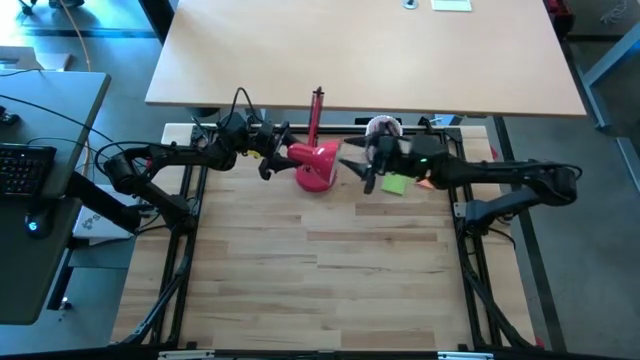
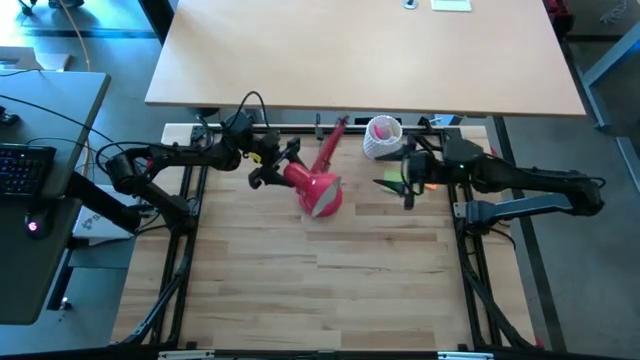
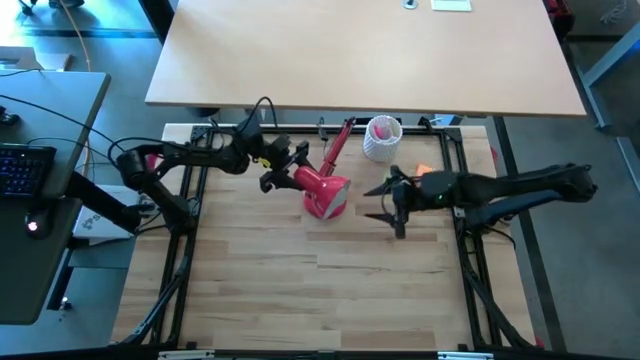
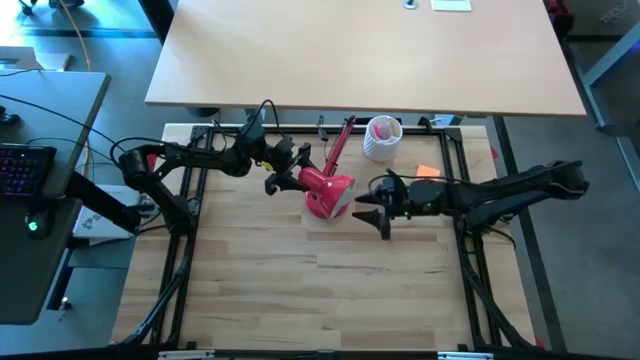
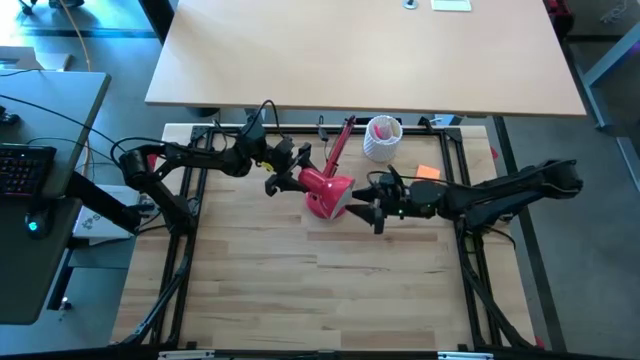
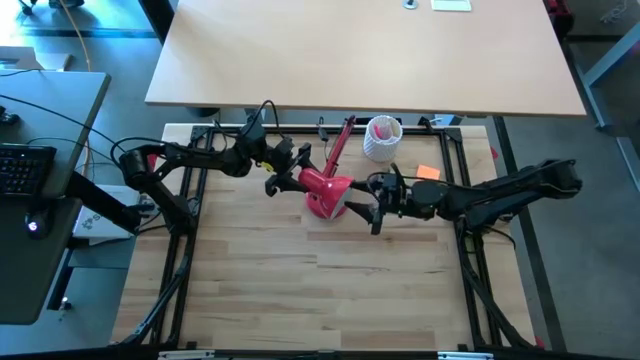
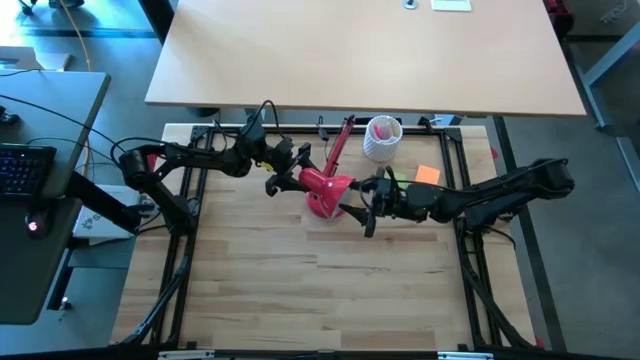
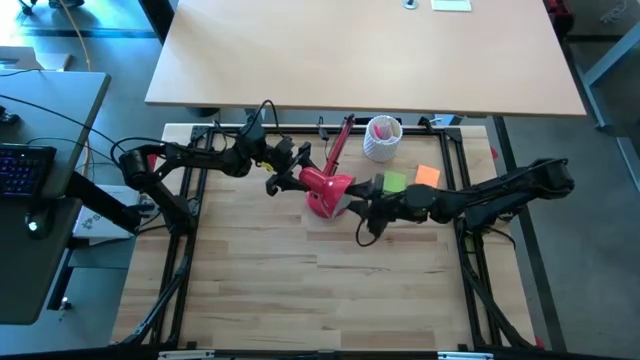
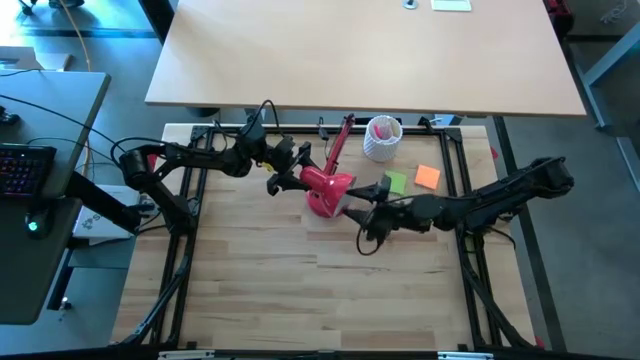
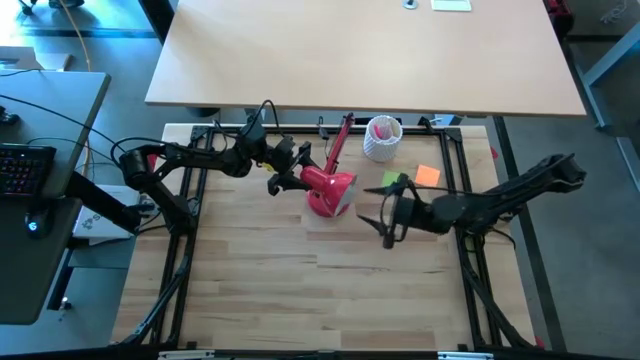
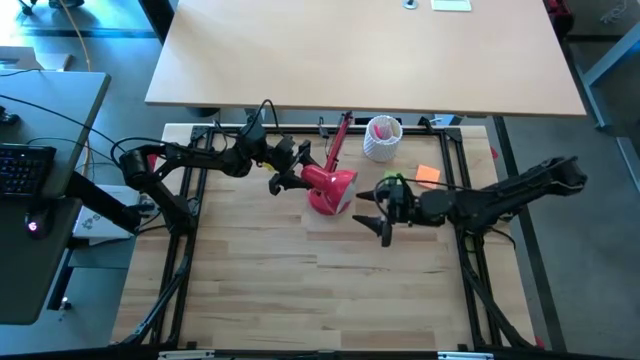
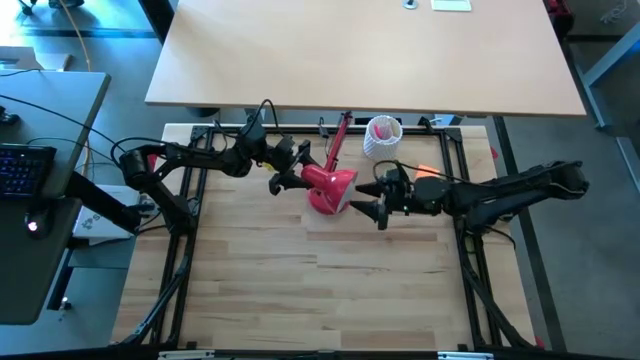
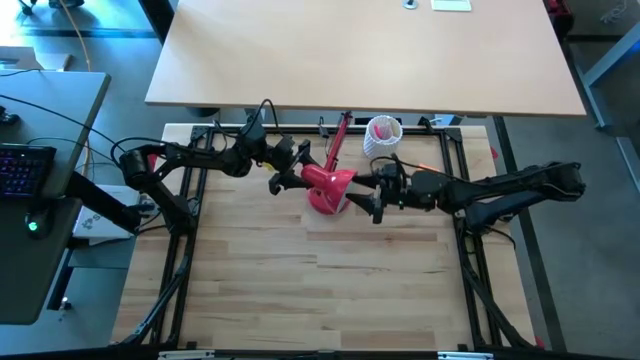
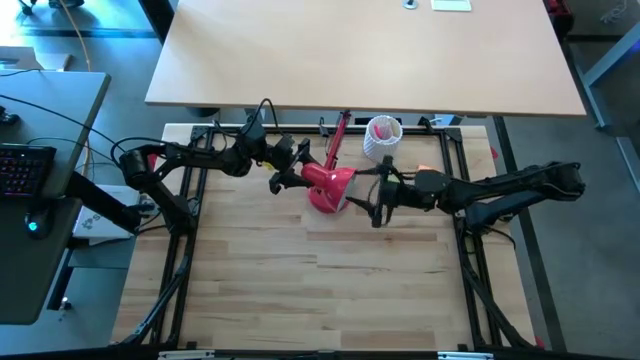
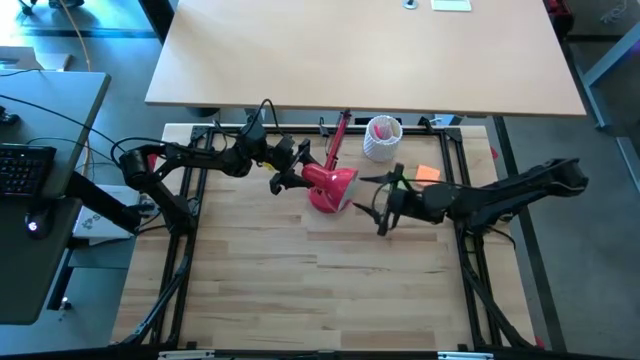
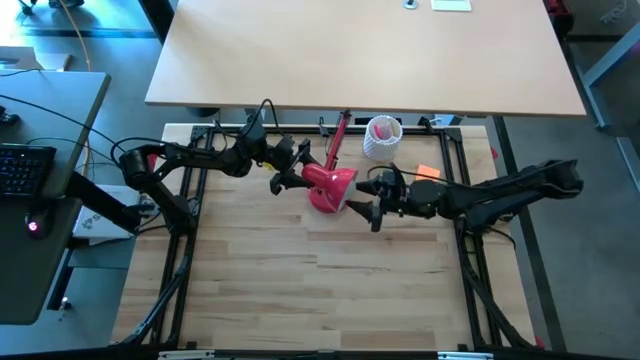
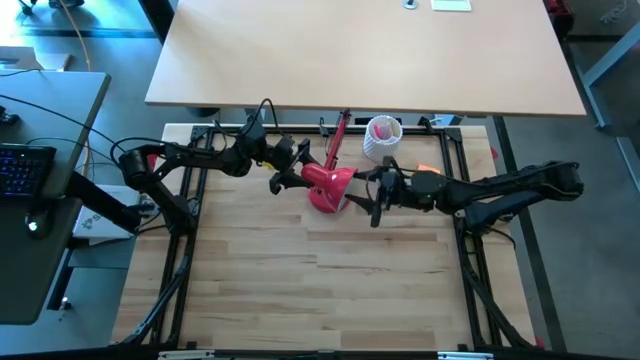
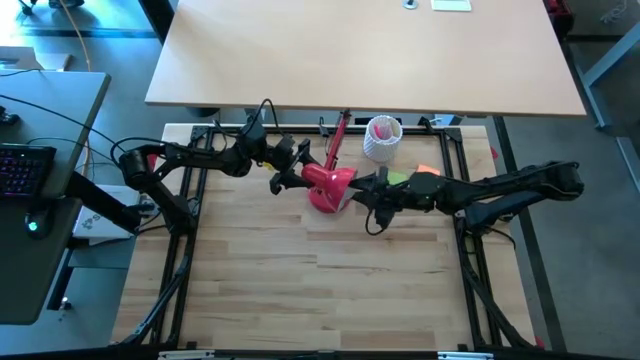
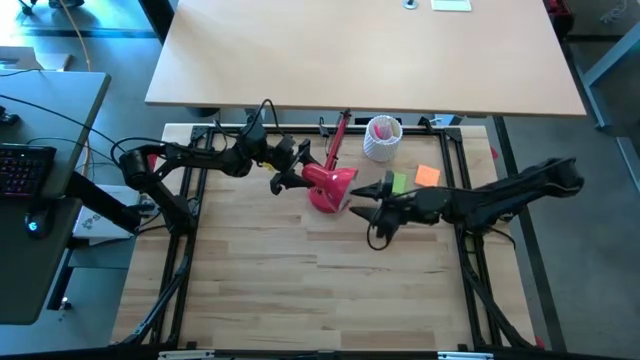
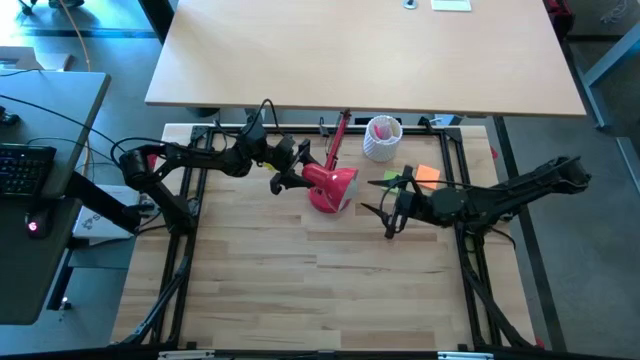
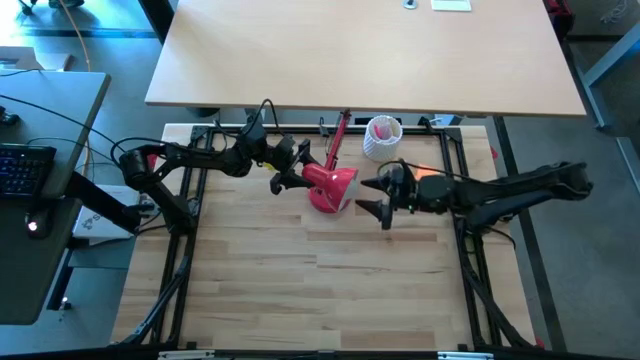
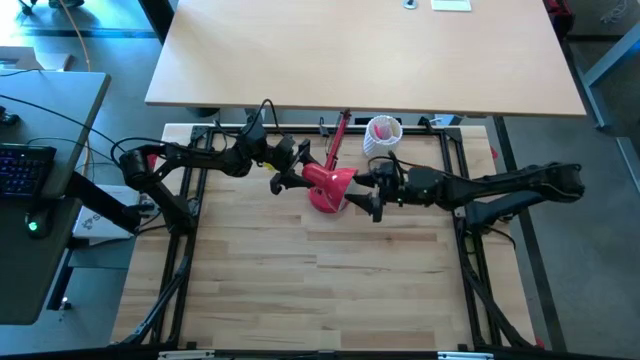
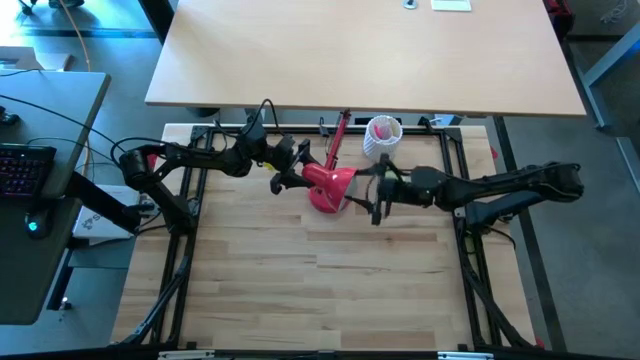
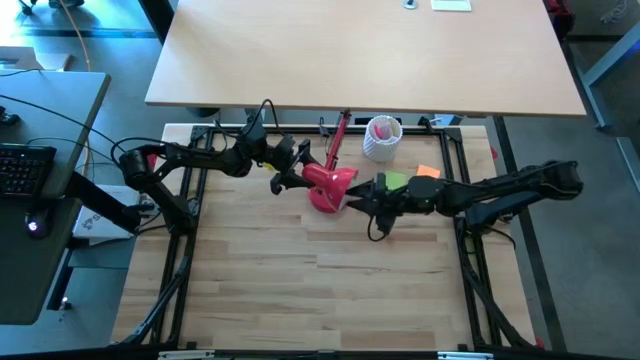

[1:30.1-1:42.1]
Task: Screw lightbulb
Remove the lightbulb from the red lamp

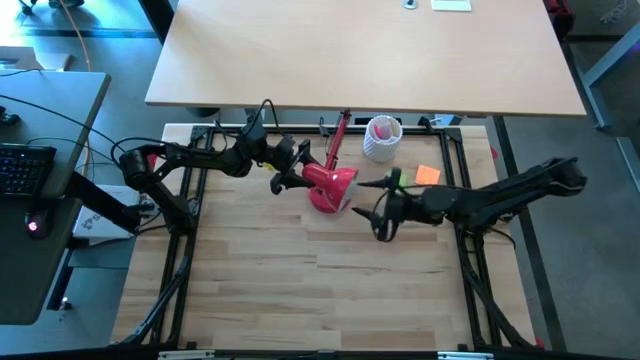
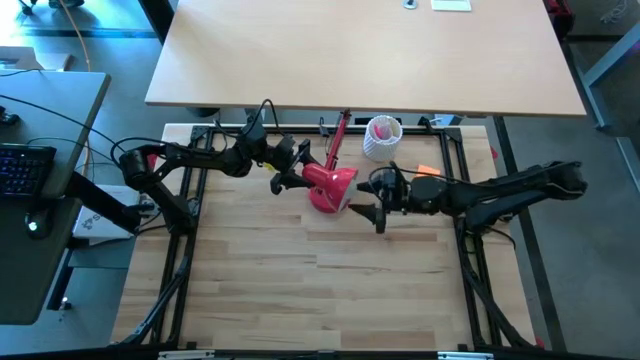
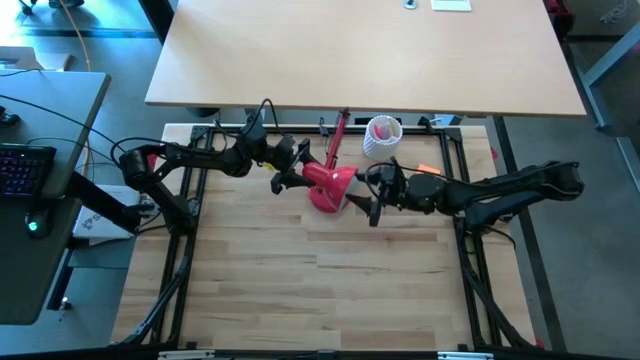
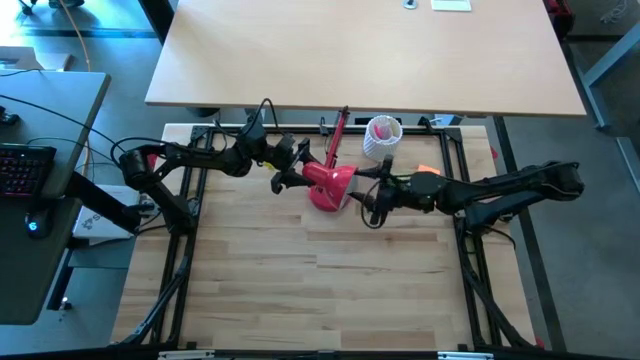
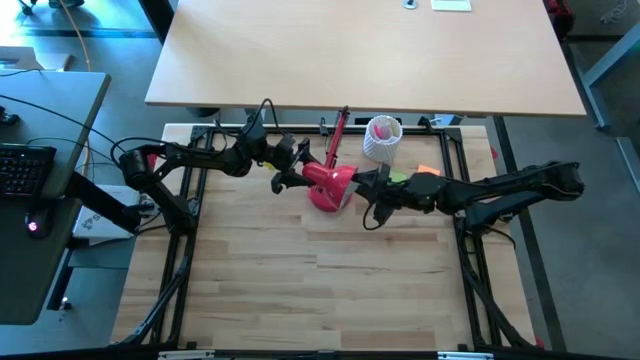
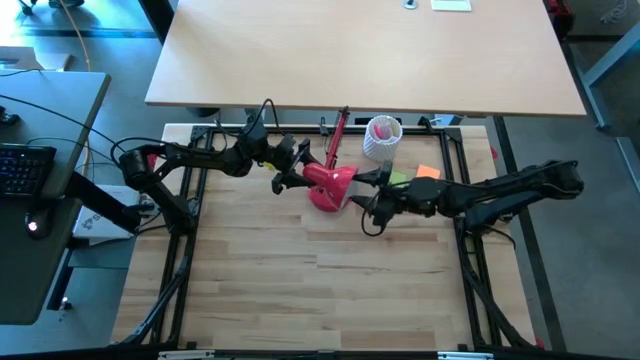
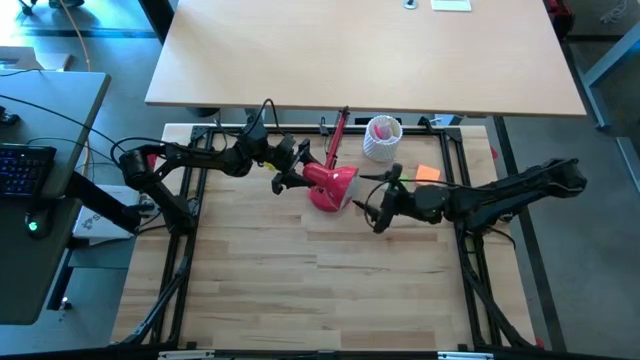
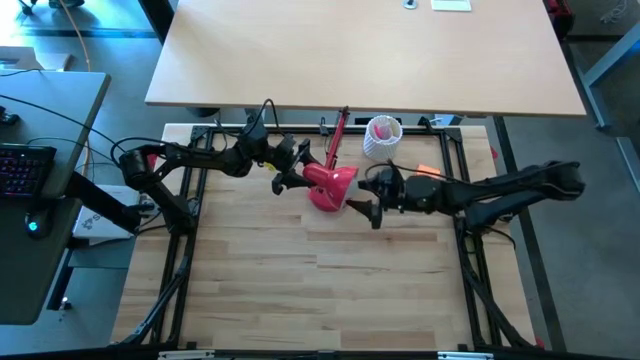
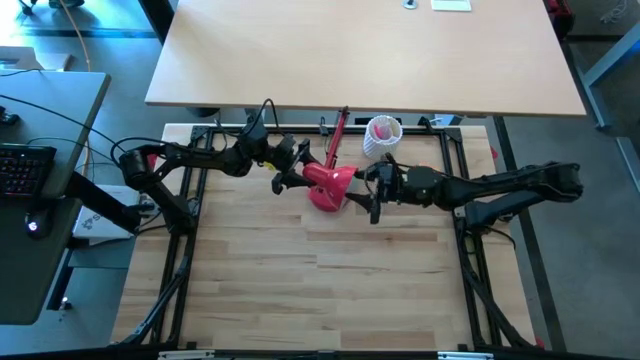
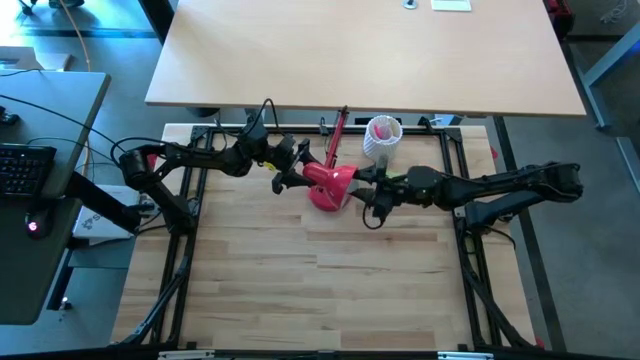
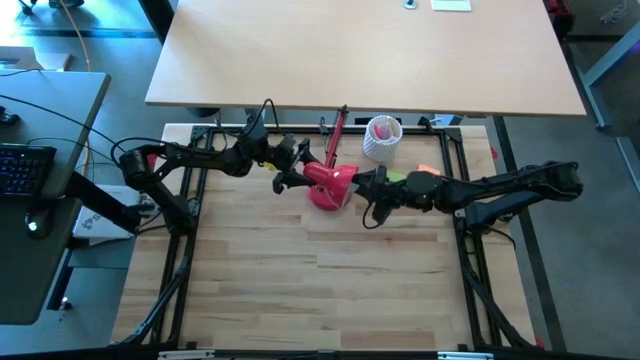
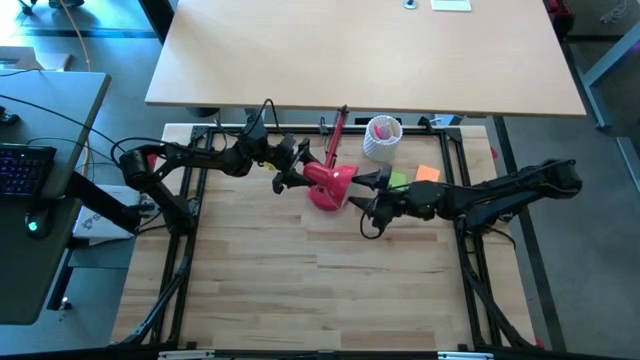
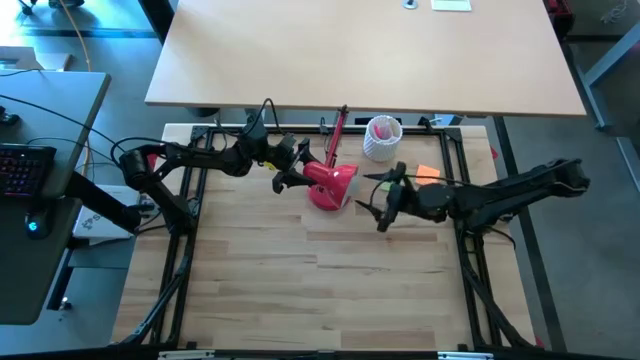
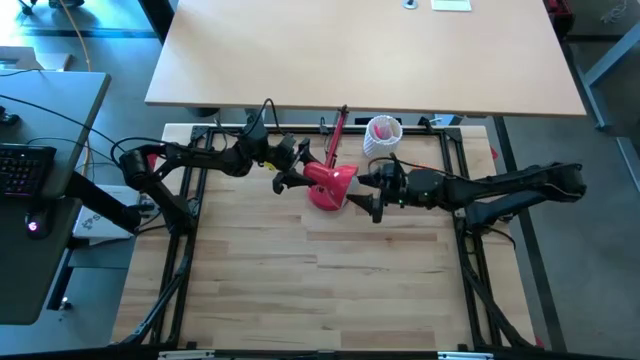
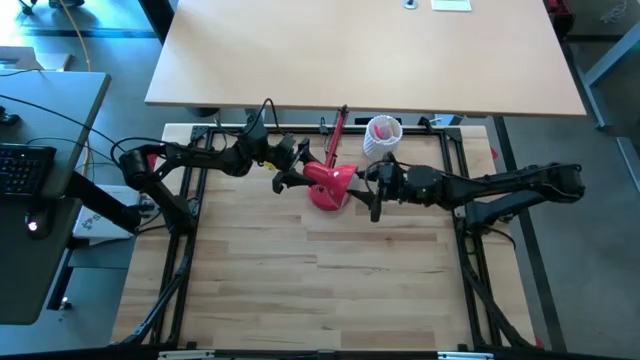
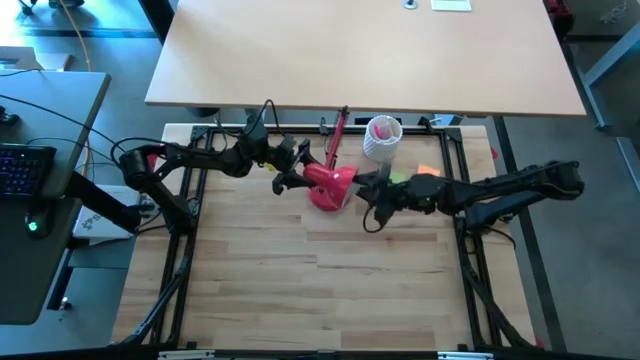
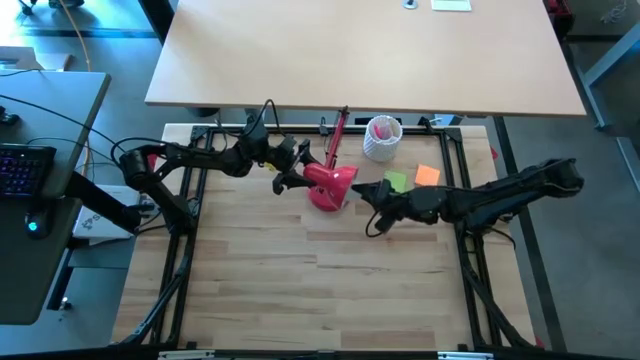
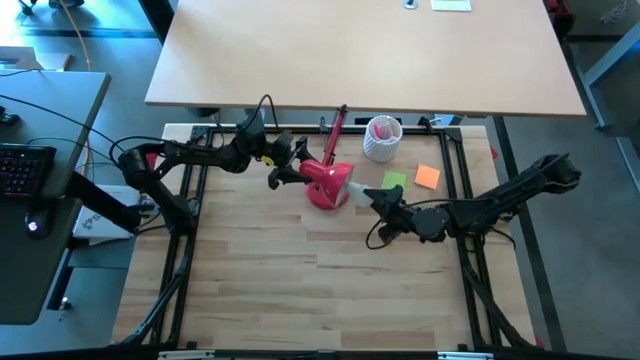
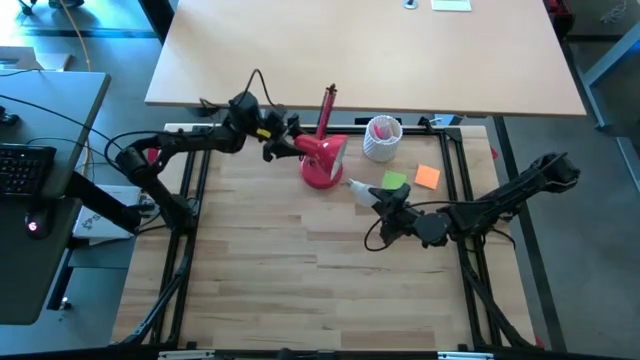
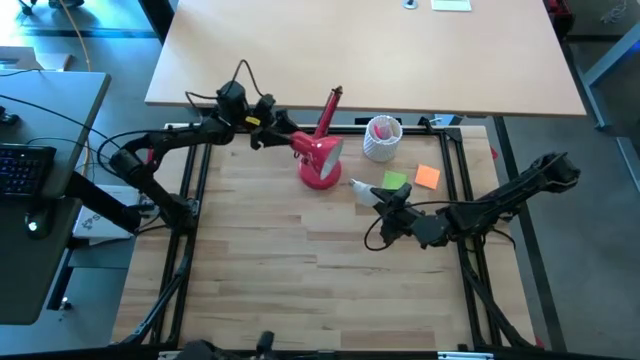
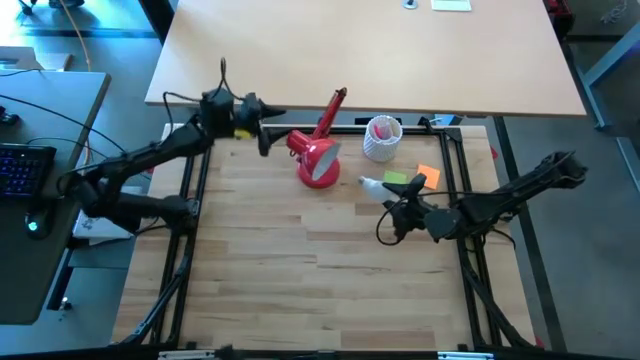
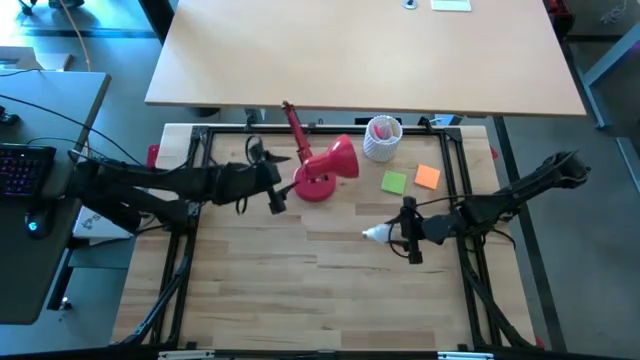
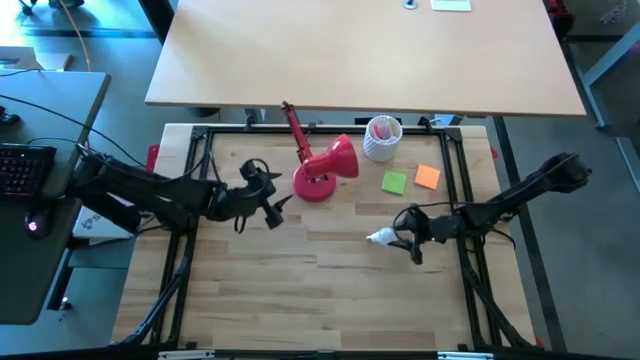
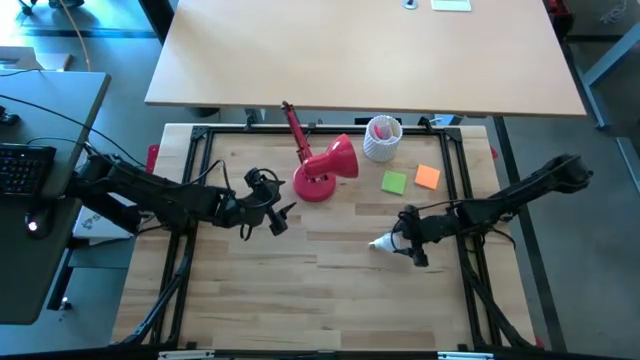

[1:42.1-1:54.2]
Remove the lightbulb from the red lamp
